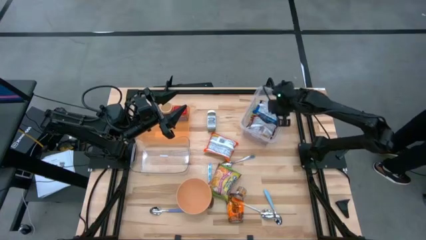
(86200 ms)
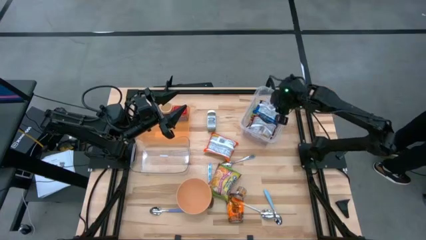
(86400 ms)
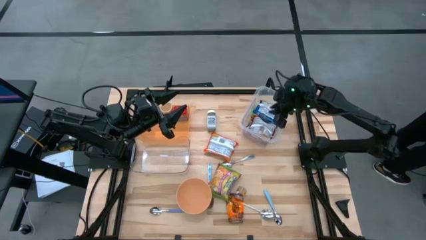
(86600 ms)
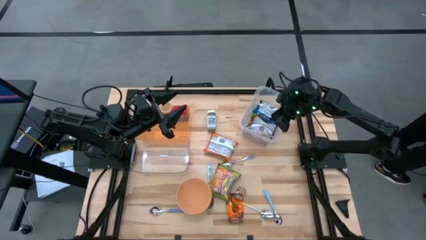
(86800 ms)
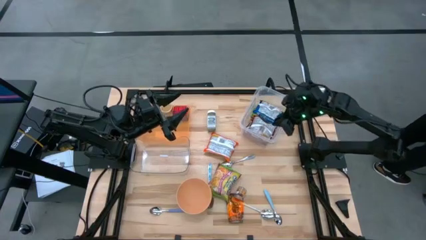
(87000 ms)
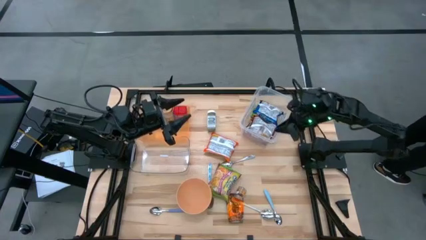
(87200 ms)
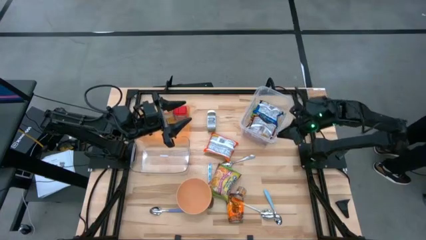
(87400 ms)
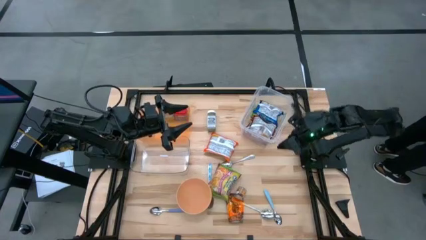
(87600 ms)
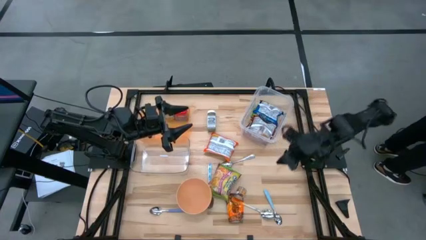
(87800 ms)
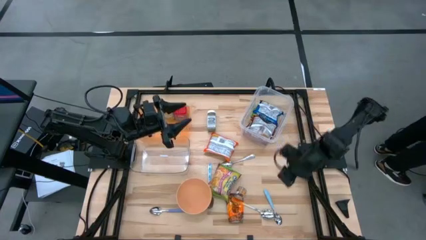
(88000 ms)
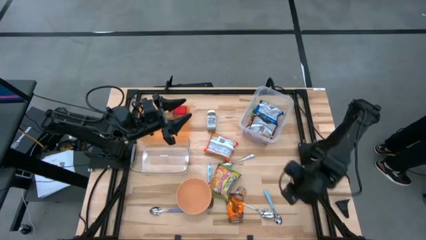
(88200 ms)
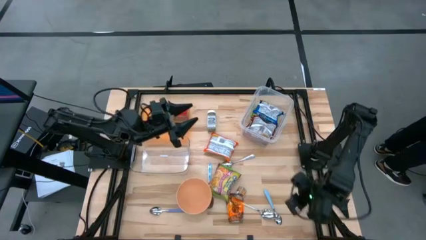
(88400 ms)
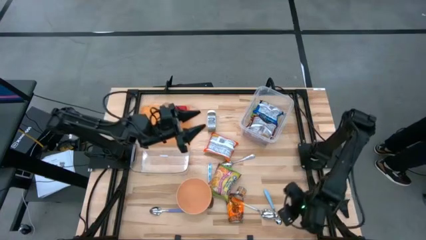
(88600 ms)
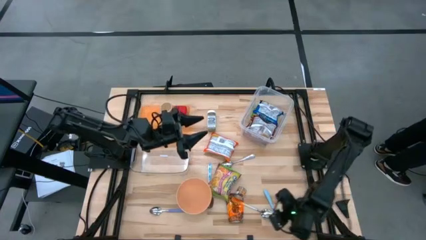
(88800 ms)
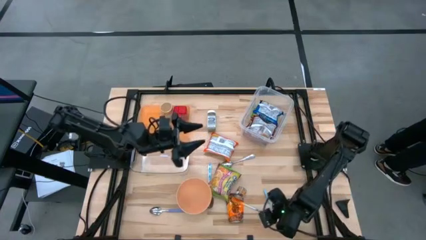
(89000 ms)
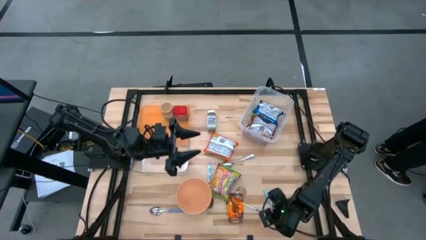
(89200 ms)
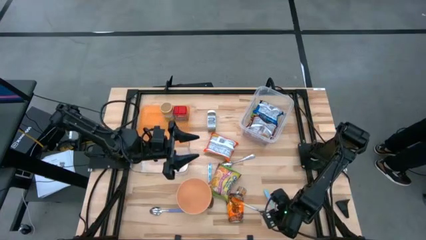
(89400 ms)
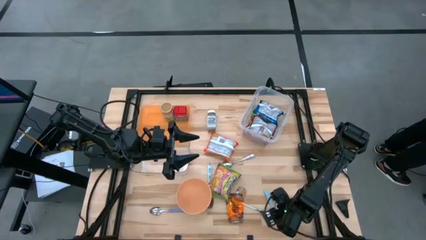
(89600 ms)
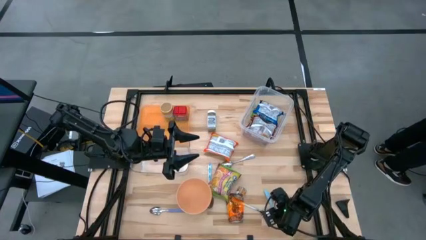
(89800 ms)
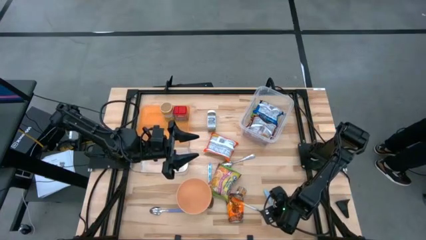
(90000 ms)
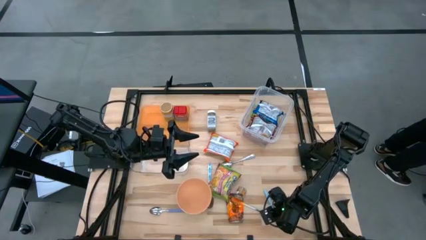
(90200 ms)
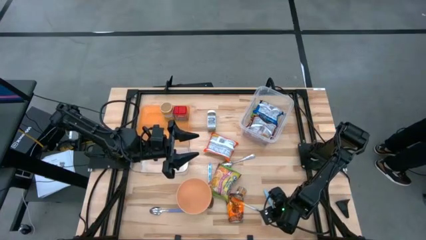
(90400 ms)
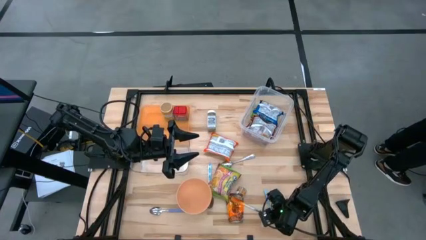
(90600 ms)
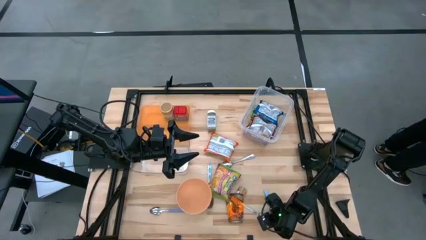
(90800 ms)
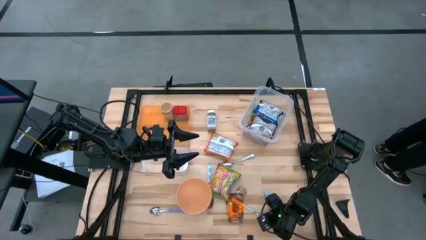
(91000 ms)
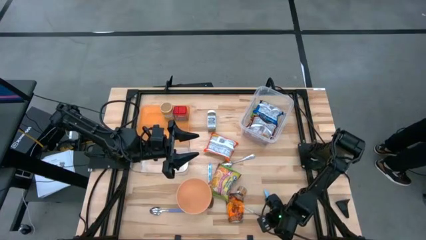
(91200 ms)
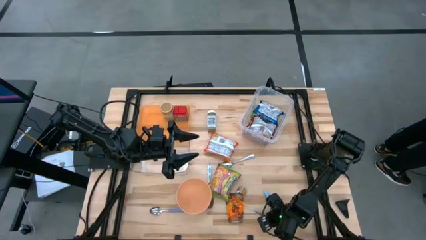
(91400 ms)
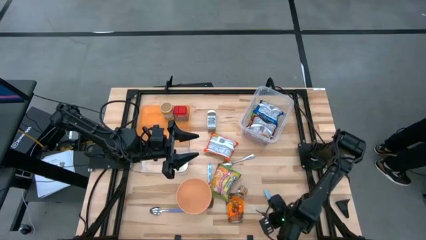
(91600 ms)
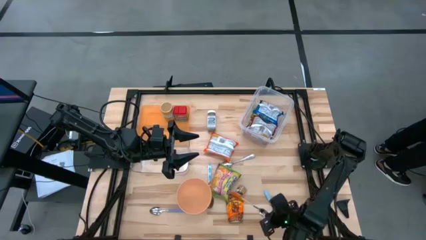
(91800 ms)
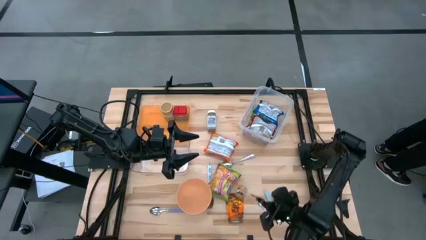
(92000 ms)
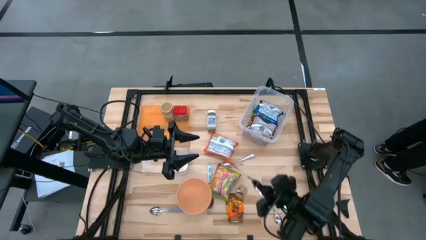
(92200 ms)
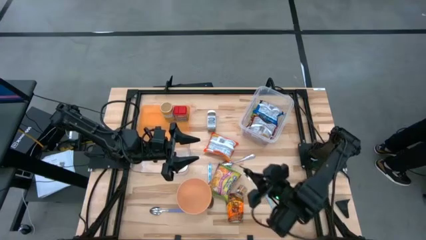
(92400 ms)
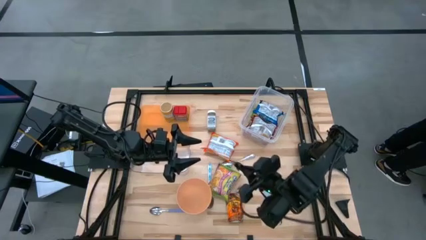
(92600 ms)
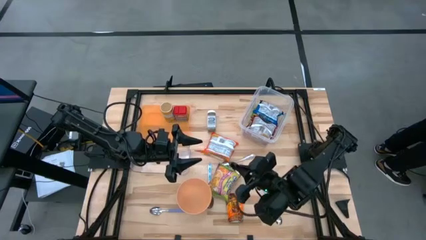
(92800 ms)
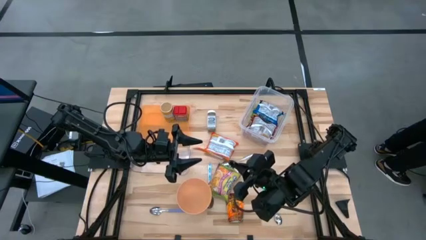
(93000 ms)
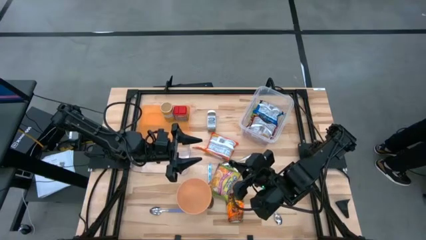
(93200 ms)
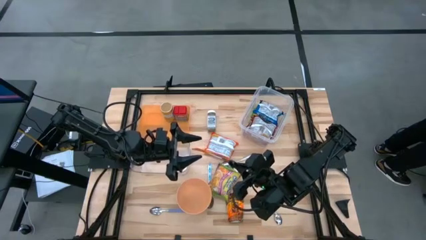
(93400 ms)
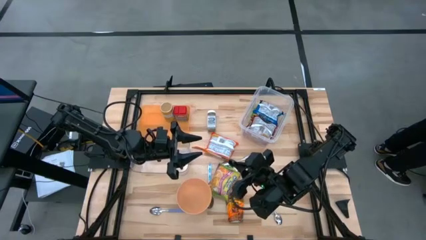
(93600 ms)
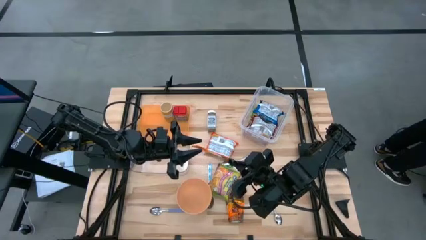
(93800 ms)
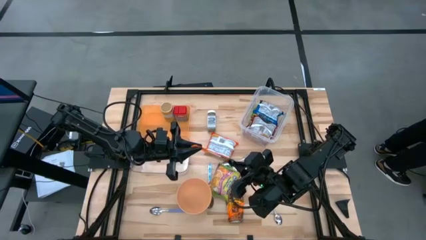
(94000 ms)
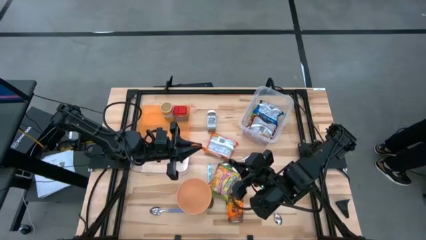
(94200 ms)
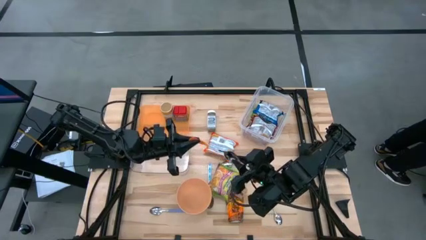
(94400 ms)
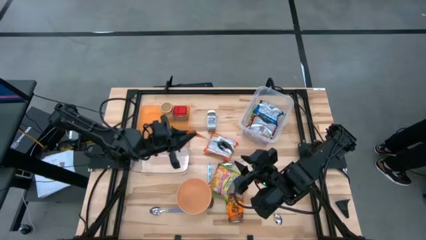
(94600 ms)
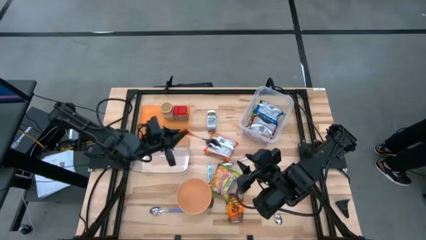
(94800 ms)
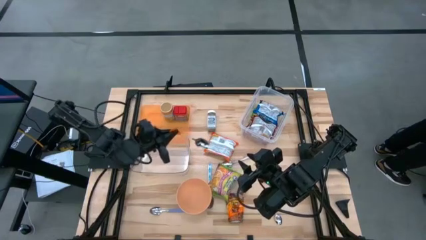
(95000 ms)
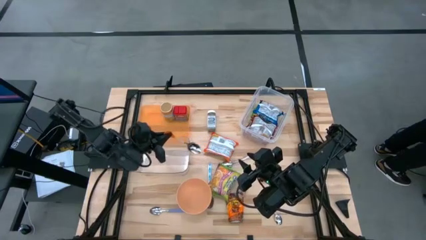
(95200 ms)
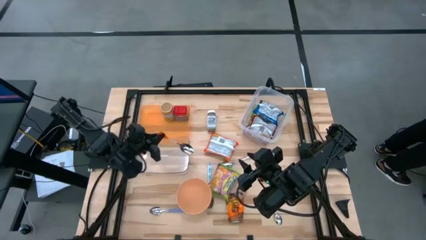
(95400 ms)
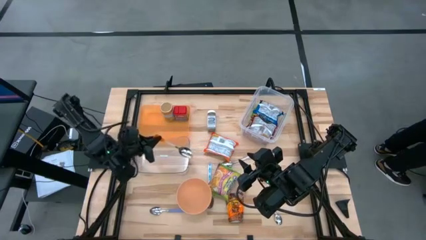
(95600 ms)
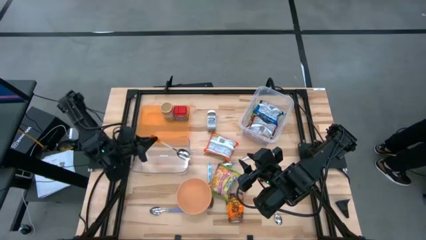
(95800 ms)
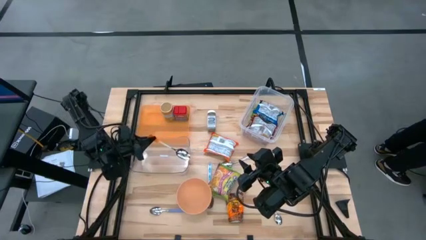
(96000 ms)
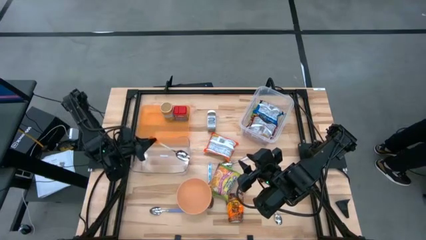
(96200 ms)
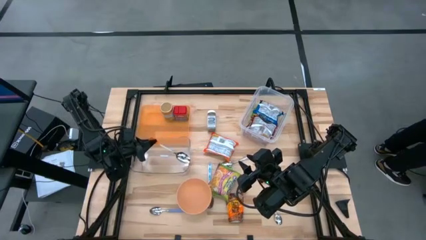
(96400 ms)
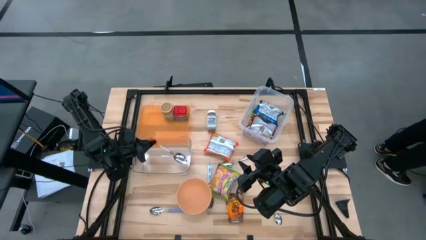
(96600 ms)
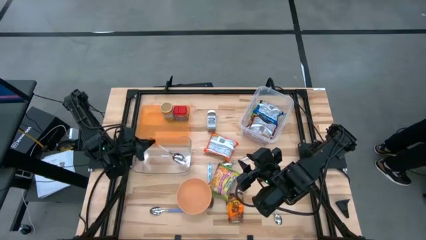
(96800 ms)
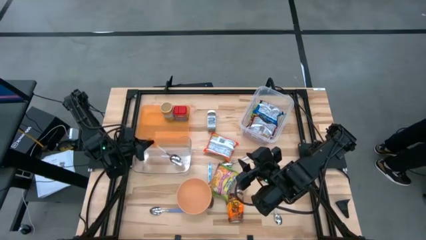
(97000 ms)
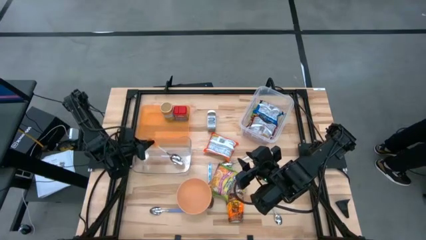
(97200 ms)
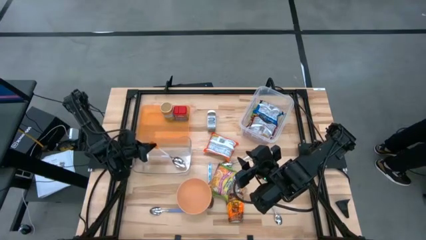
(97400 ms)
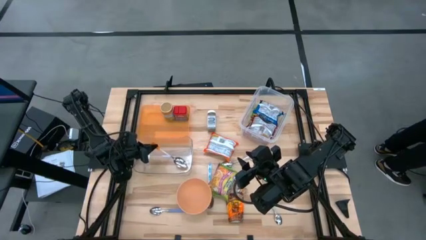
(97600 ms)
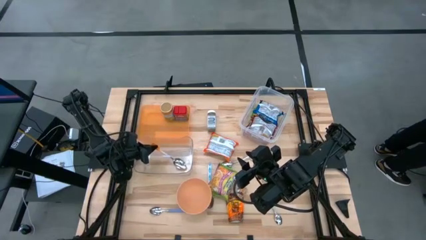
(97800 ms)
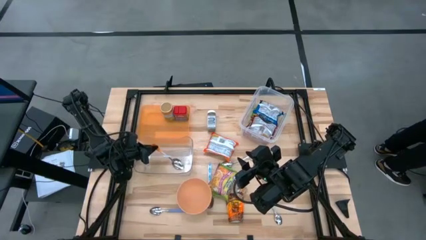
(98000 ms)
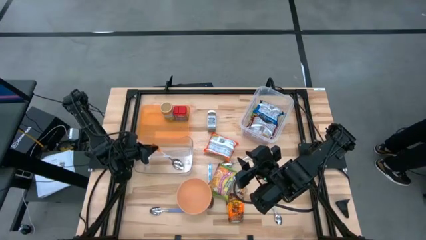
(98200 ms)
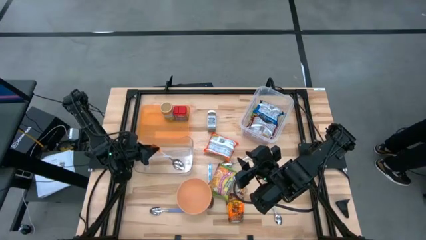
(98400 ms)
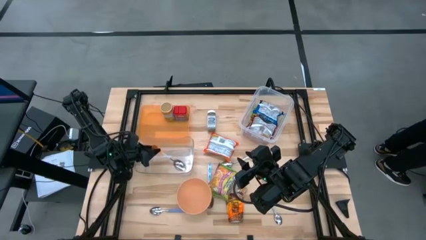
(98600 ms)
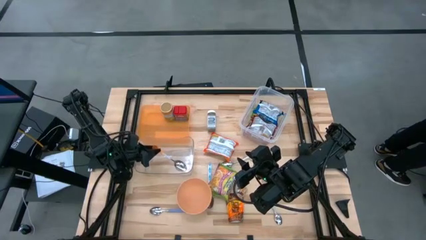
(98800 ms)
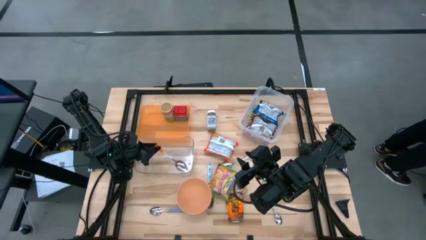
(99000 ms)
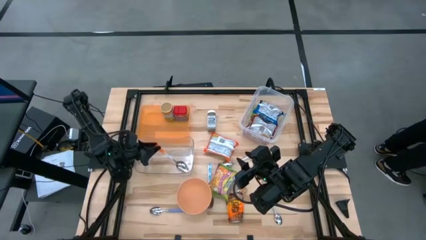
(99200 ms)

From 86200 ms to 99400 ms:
Task: Pick & Place Food Item
Put the orange spoon into the bottom transparent bin

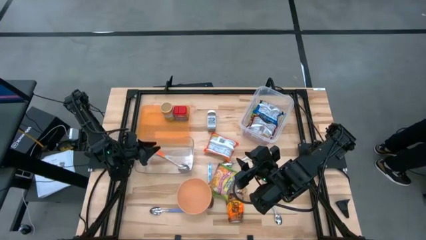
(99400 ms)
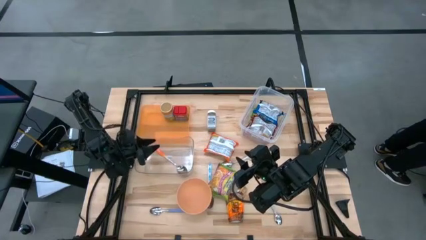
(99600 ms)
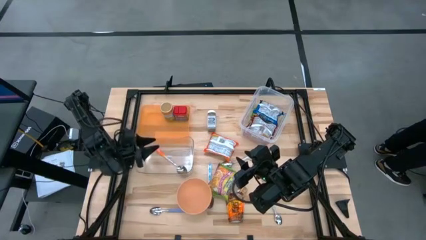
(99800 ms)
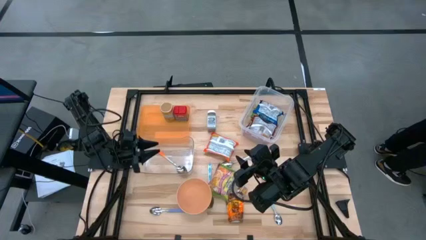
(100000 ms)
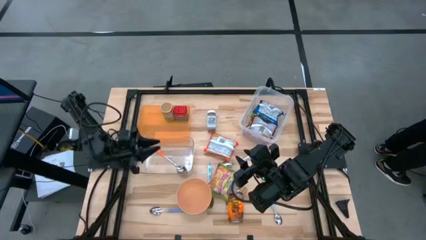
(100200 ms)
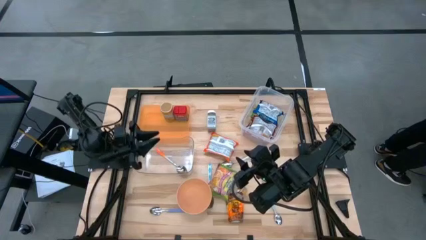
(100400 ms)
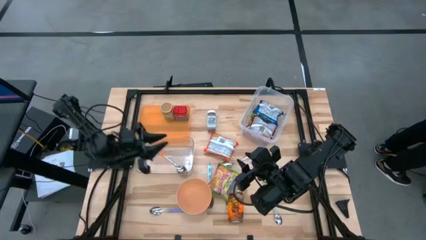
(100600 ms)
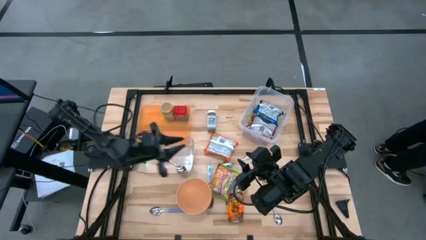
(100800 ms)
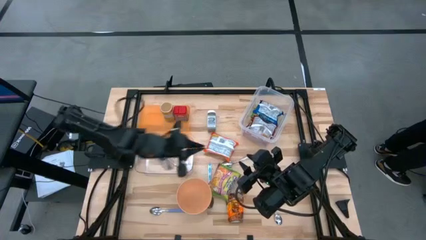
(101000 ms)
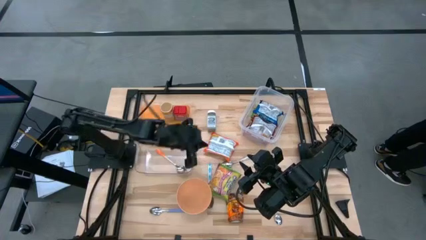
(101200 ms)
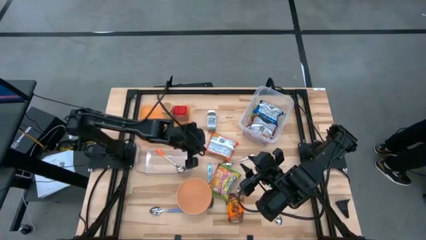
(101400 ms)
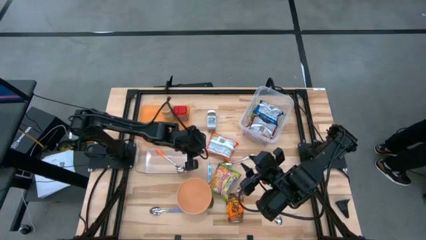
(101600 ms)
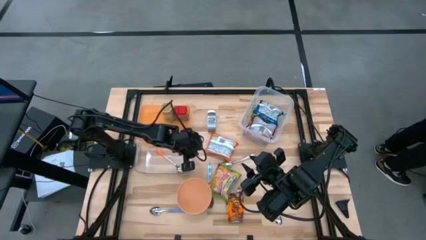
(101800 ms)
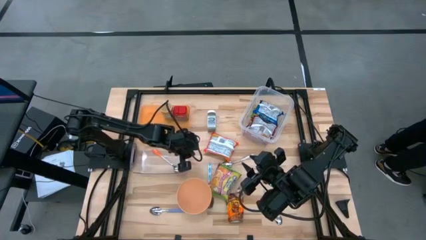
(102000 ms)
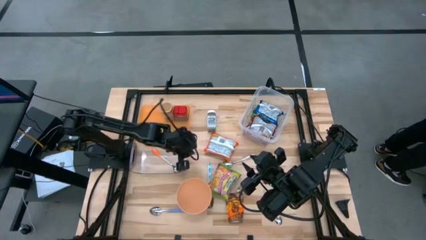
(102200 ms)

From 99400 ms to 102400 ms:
Adjust the bottom transparent bin
